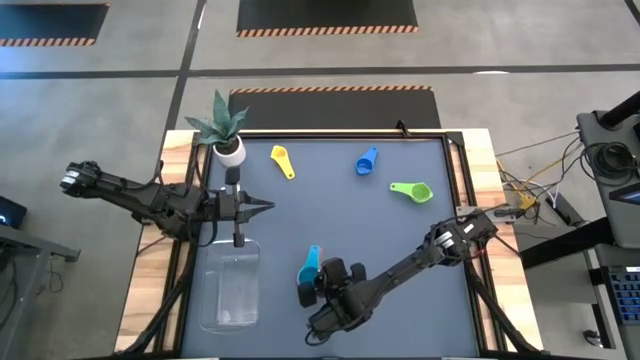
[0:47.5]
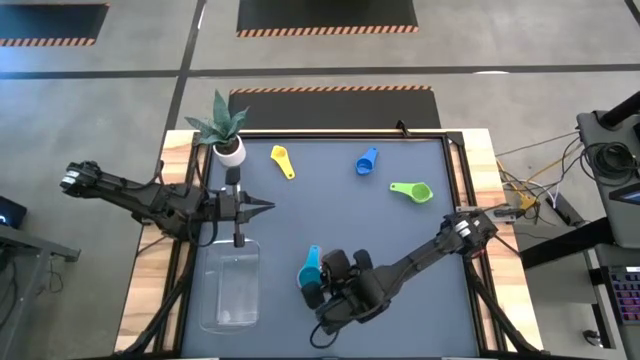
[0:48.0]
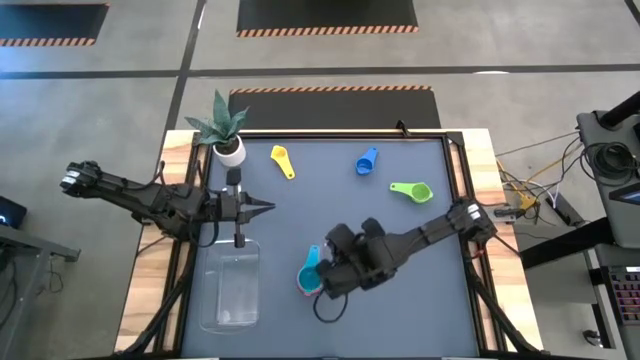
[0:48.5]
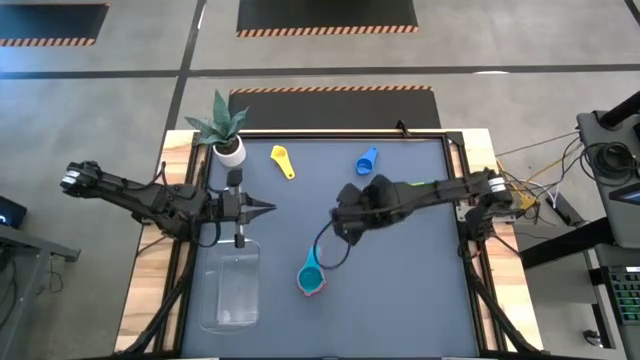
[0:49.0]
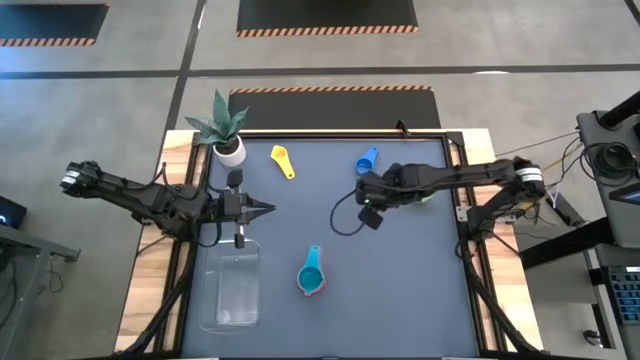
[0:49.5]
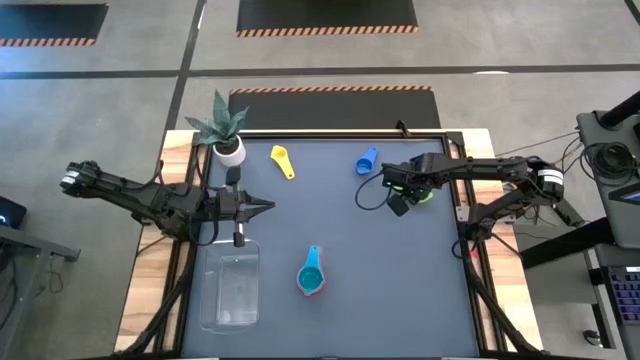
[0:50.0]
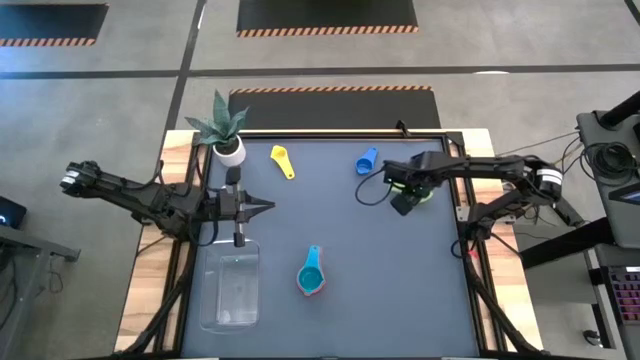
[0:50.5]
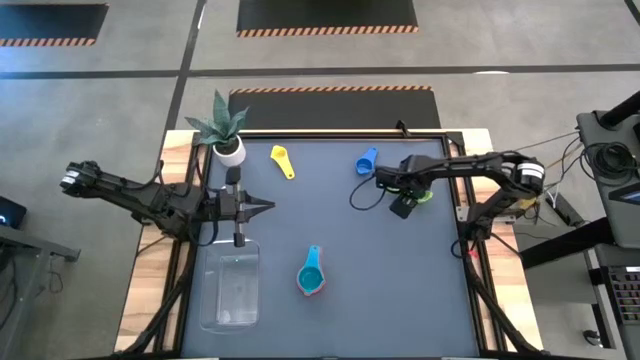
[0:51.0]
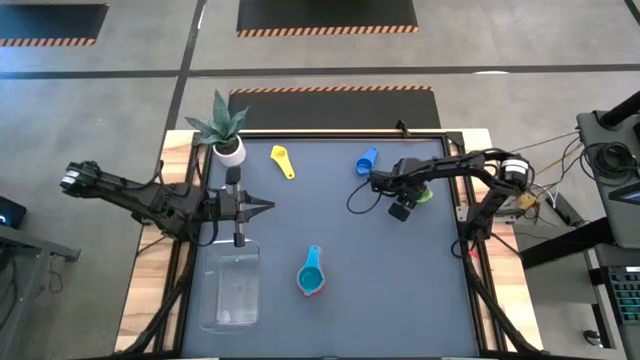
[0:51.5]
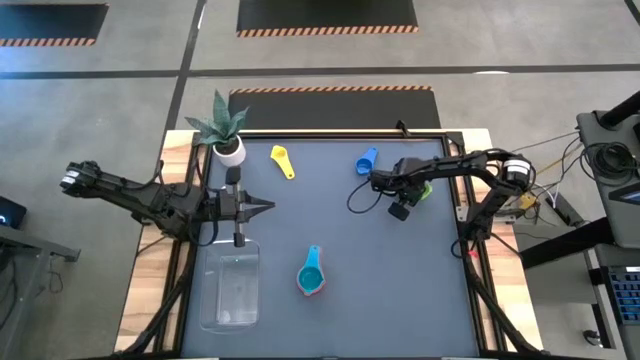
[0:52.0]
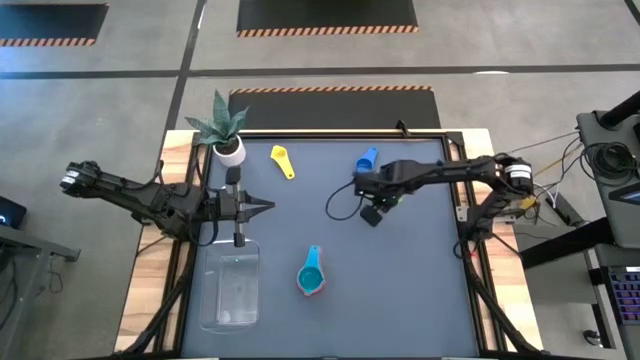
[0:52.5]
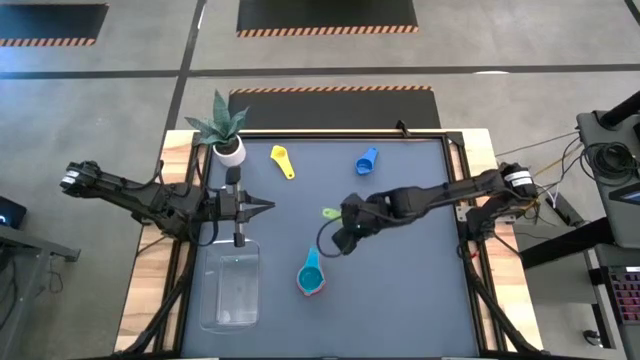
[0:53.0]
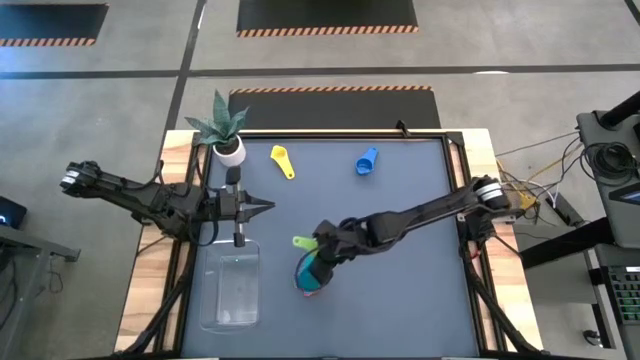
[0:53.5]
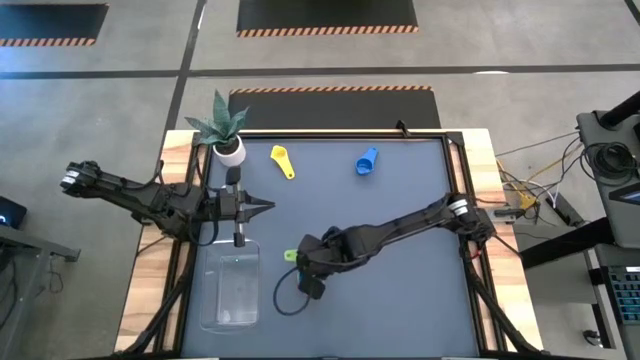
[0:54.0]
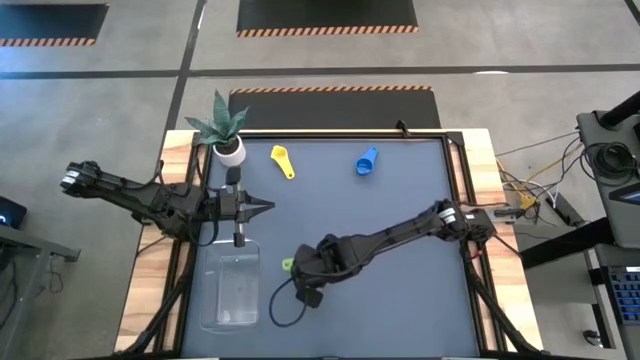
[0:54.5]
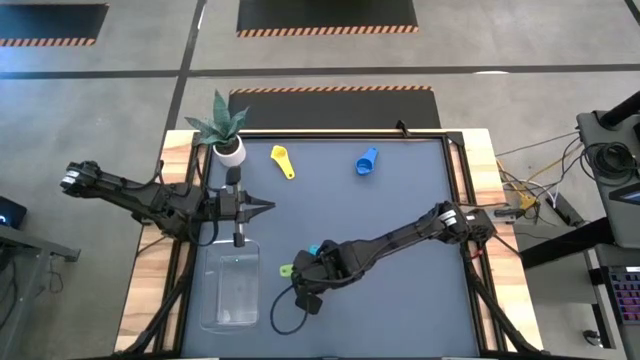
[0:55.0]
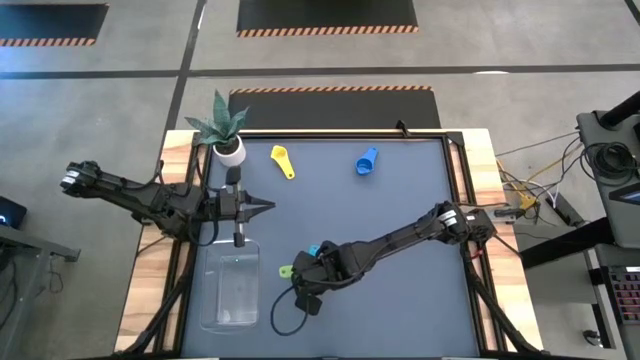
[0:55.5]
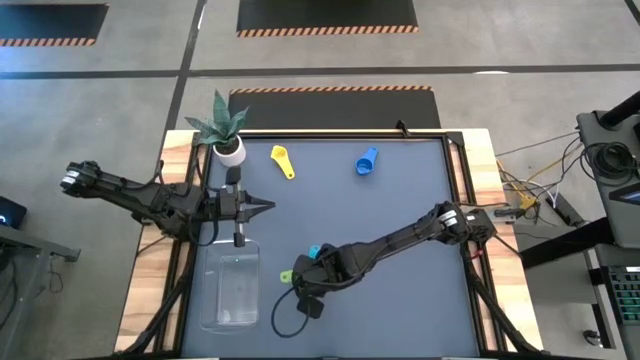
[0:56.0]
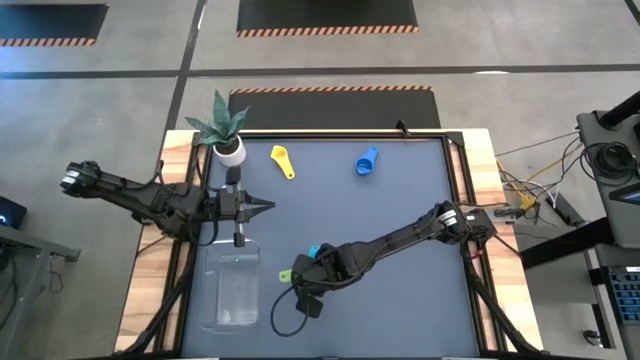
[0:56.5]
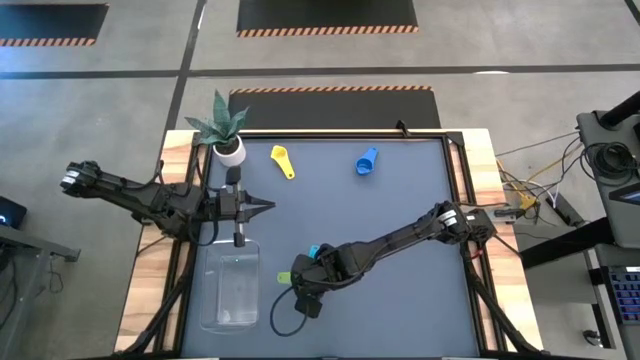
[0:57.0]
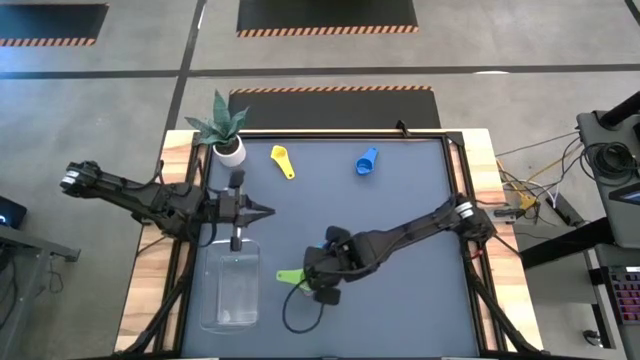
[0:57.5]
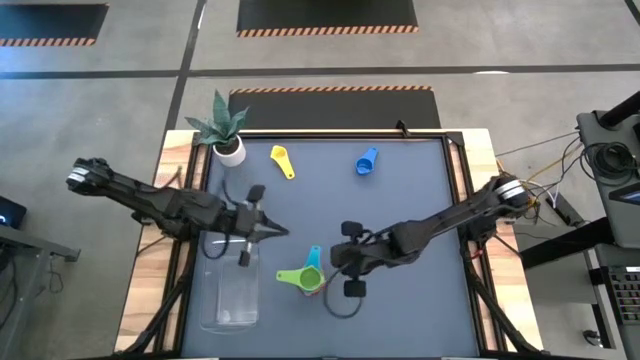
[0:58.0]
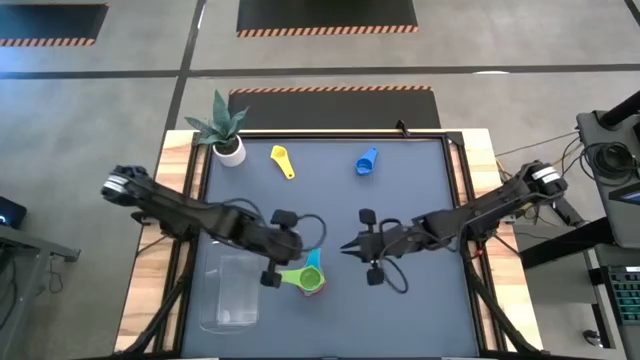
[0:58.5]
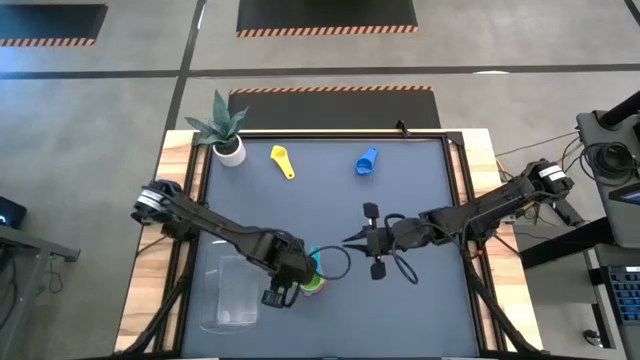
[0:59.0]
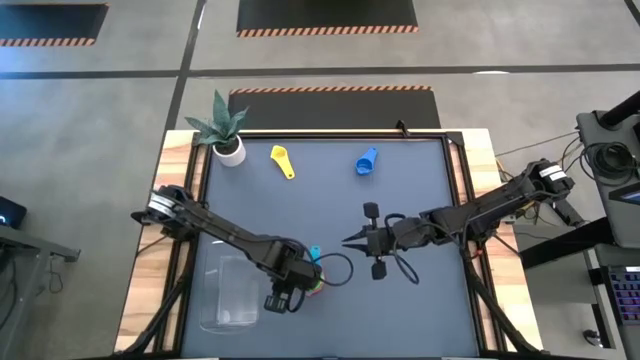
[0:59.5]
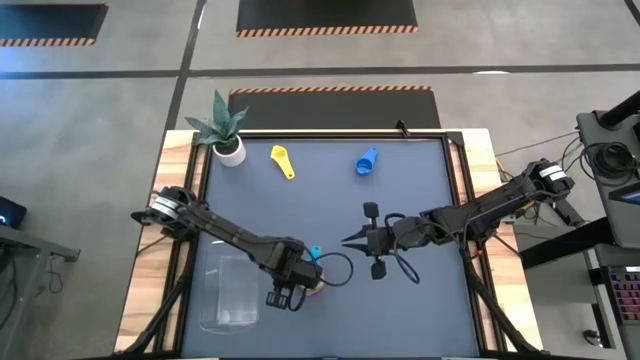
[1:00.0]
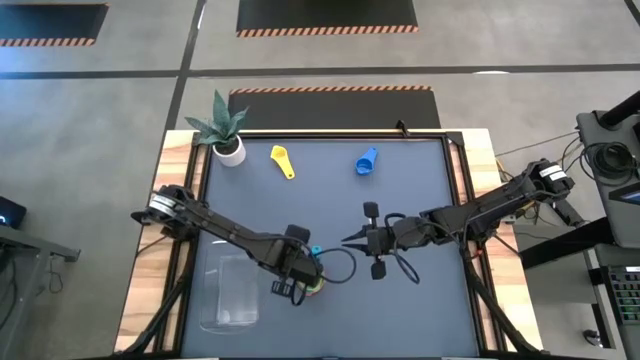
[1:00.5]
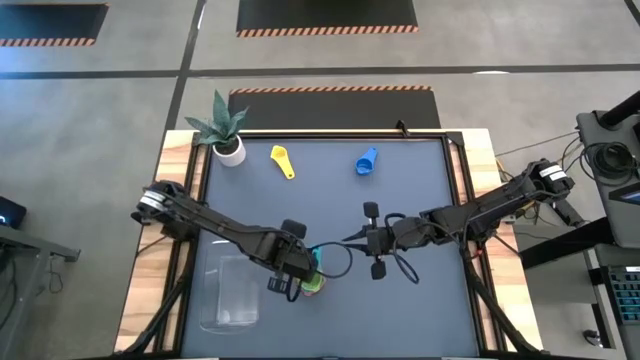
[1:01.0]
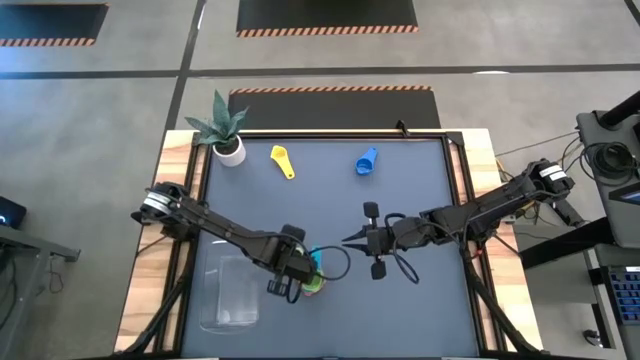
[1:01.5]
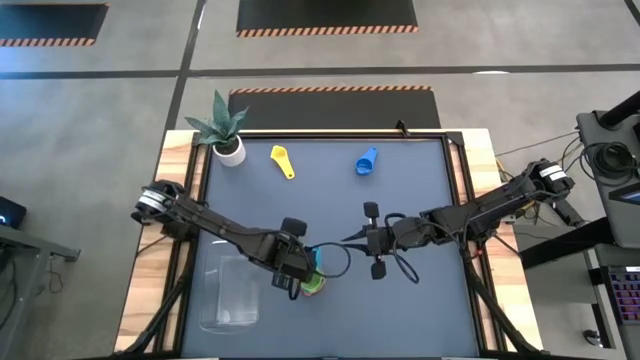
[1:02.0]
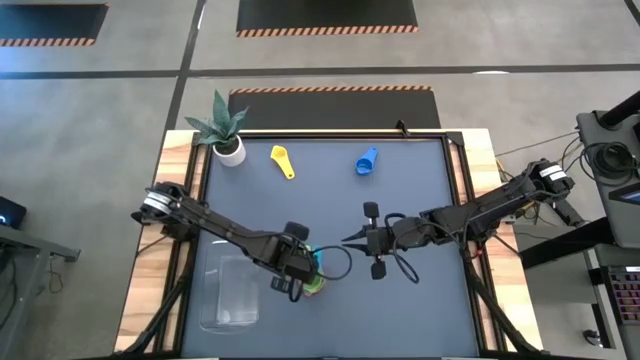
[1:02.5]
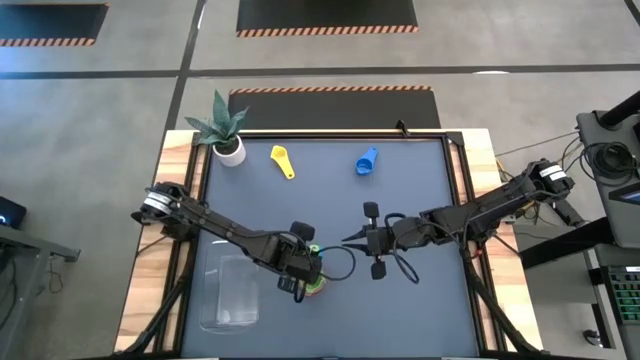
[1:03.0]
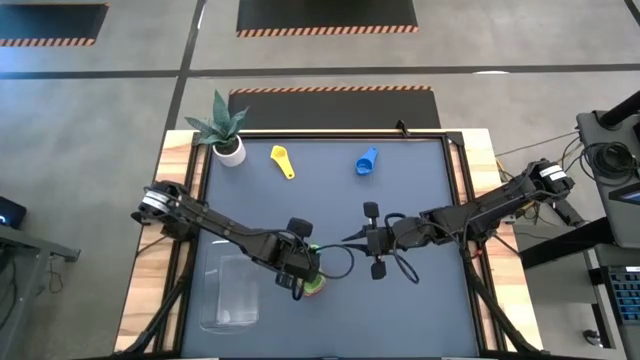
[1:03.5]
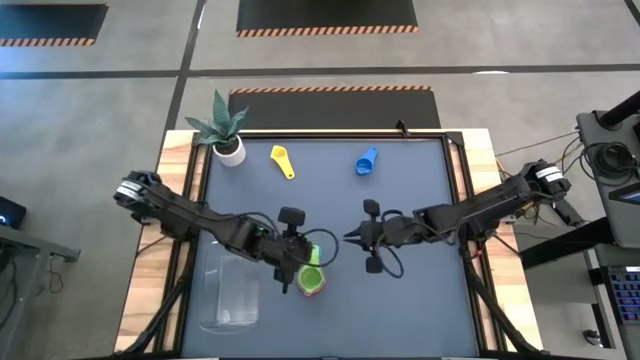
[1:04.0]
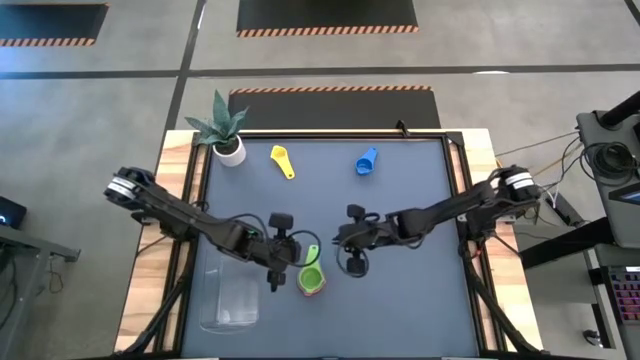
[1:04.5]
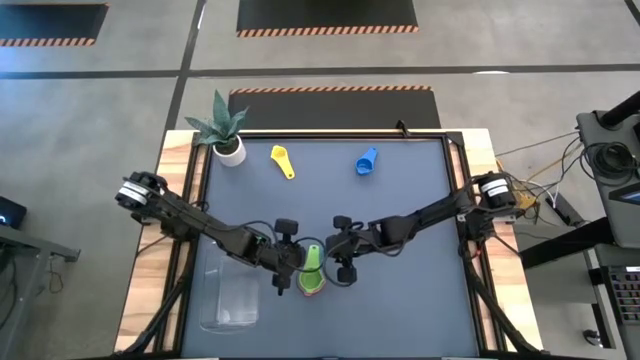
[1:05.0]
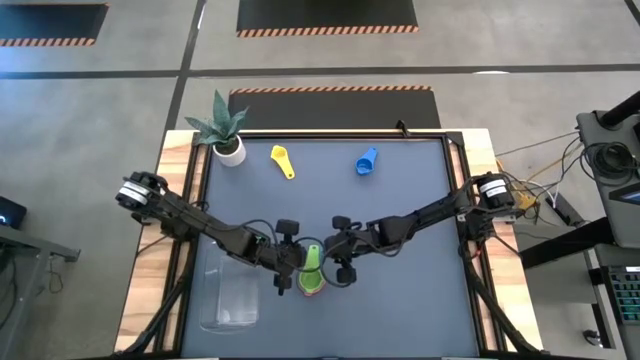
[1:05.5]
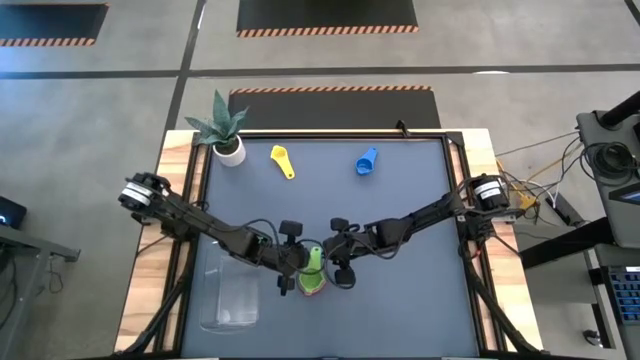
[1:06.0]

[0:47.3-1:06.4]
Task: Nest measuring cups in basket
Stack the green measuring cup on top of the light blue measuring cup
